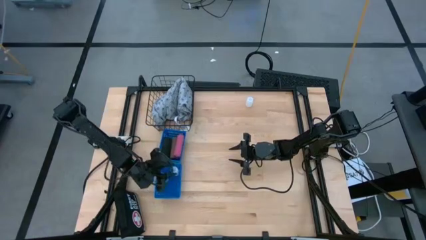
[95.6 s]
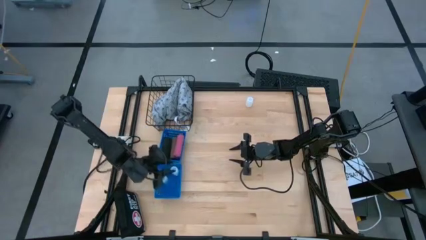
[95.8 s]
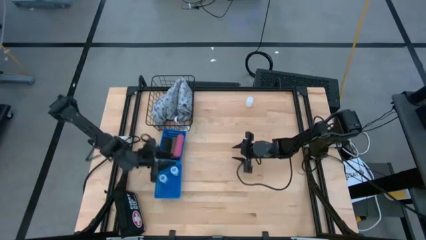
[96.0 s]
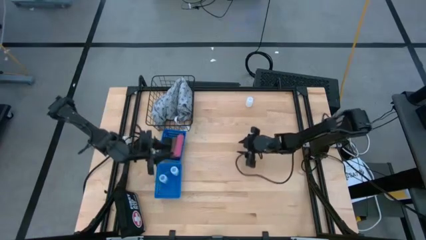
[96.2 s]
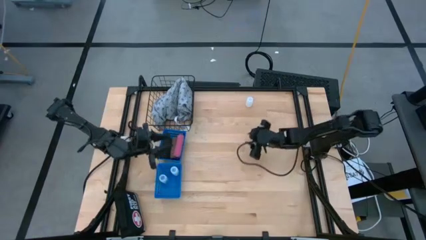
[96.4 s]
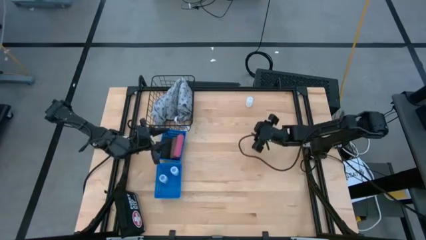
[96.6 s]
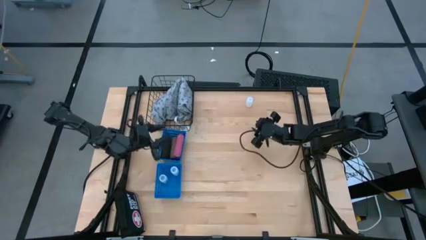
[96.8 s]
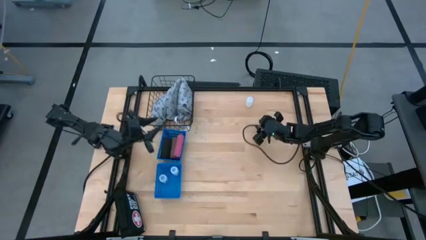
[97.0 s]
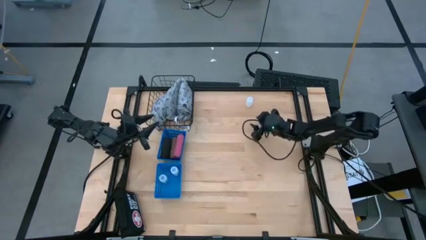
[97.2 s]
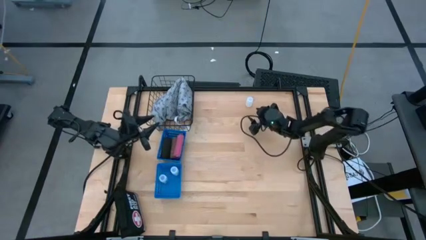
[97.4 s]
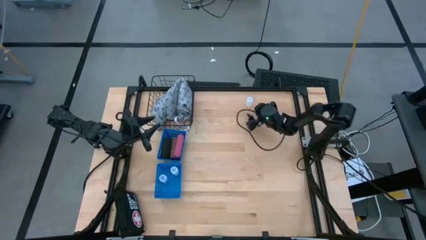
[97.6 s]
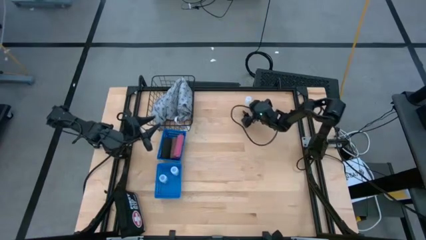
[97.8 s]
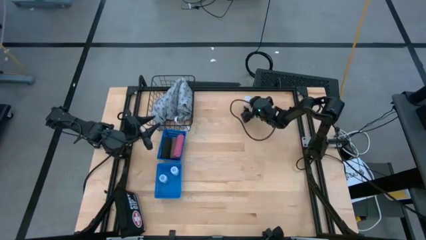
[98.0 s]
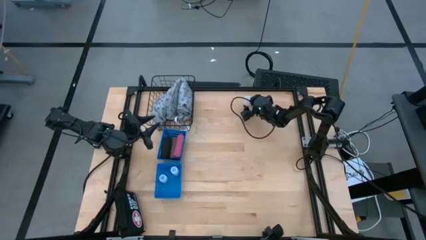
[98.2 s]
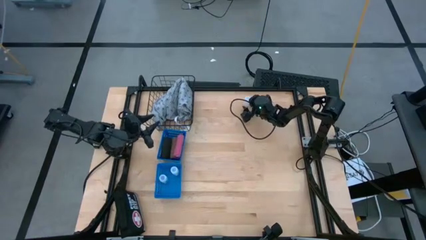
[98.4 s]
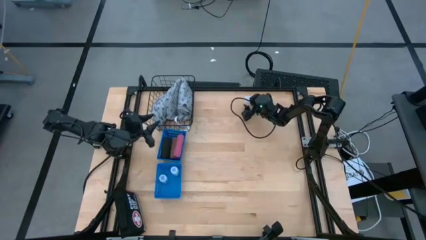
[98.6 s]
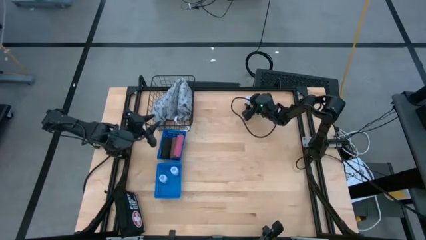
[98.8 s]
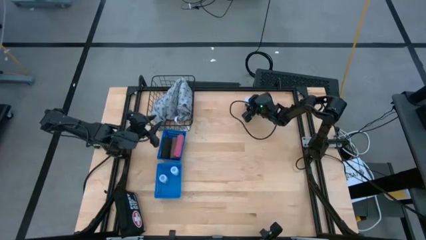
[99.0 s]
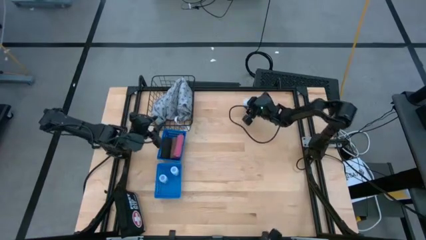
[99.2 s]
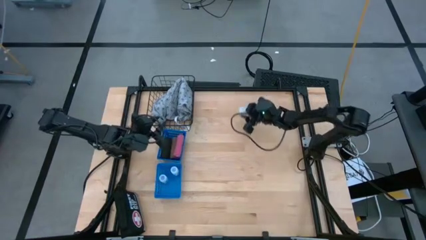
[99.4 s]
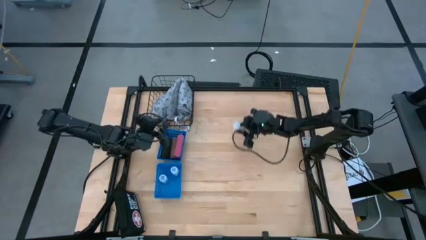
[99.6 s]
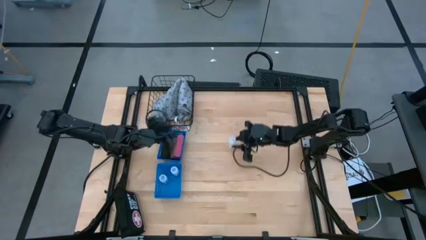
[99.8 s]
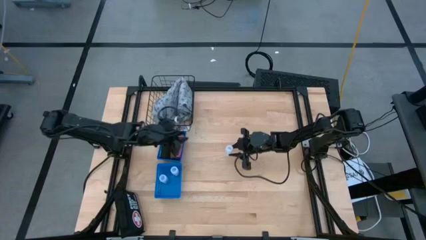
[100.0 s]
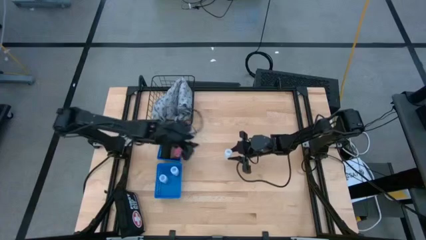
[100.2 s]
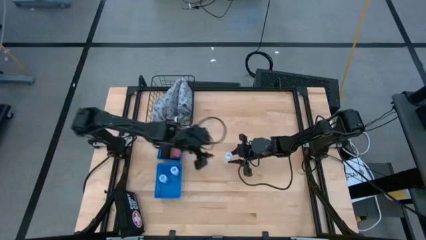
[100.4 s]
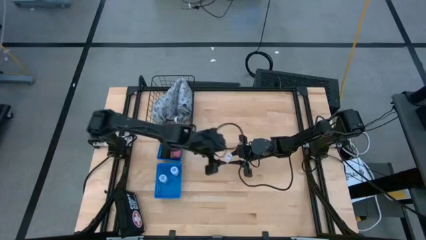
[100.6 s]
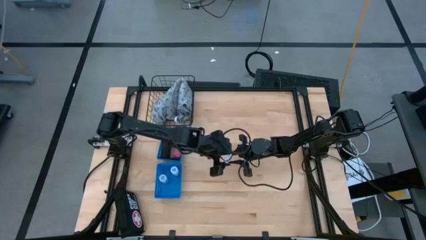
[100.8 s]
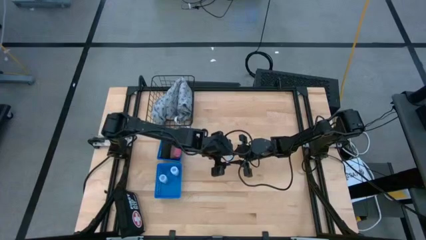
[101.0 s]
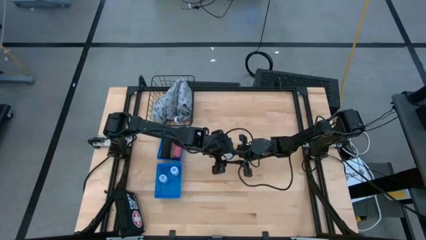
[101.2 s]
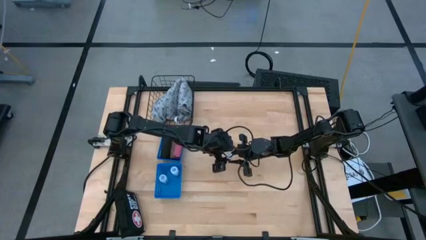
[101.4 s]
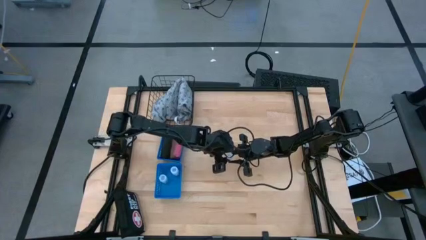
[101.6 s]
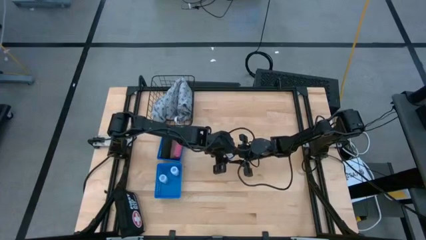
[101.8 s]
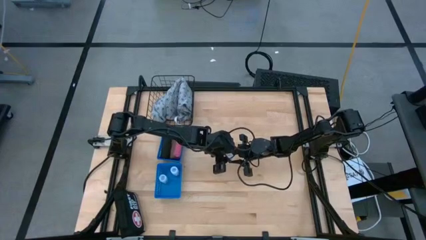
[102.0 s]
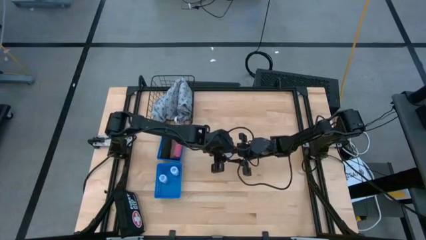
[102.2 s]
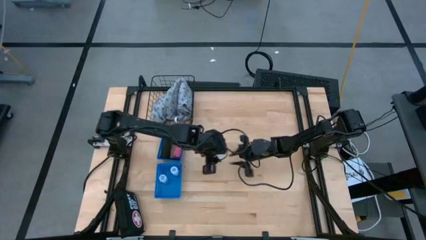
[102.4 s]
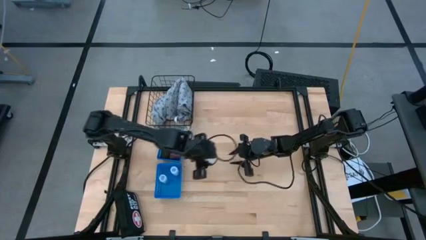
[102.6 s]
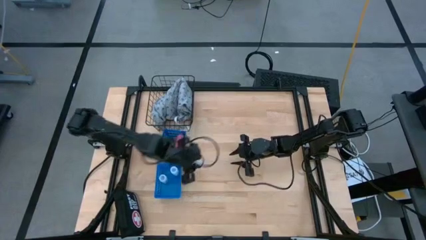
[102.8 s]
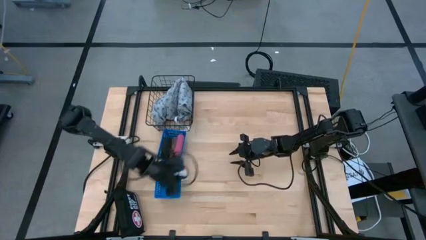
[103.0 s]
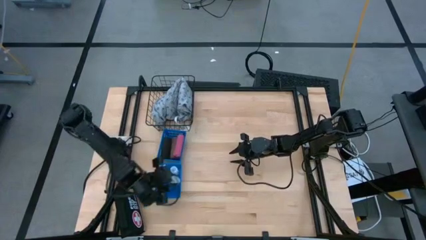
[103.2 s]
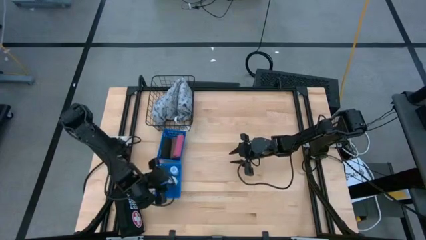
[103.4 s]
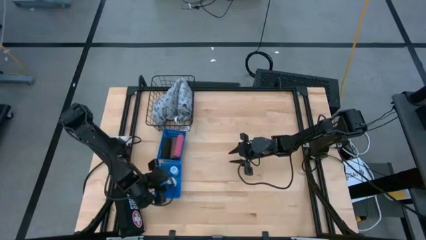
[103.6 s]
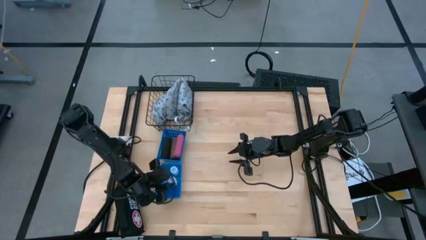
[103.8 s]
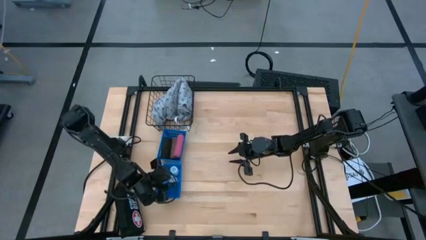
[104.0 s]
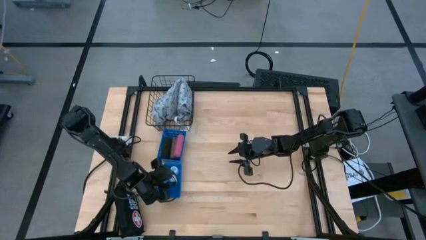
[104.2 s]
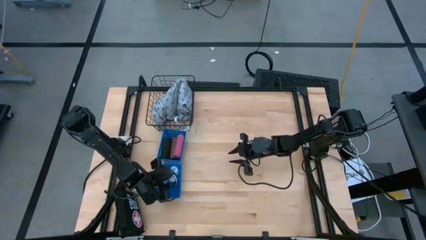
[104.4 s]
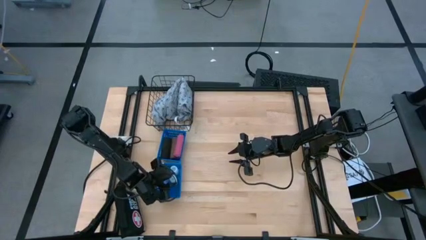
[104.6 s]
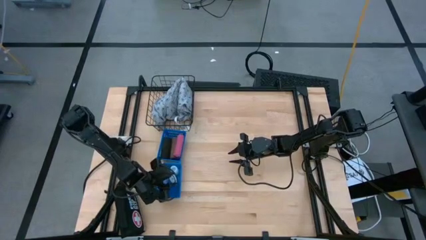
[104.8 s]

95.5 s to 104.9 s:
Task: Pick & Place Medicine items
Put the transparent bottle into the bottom blue basket

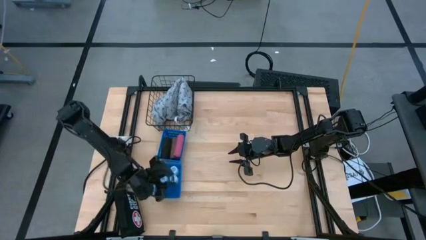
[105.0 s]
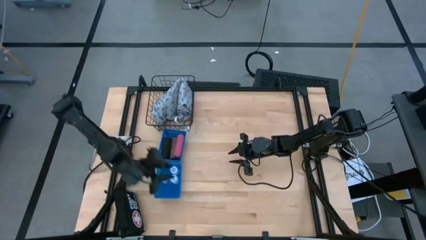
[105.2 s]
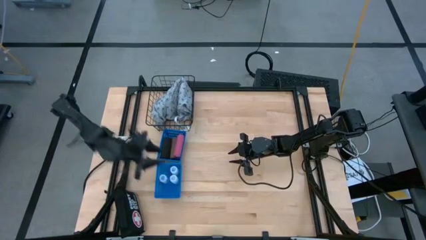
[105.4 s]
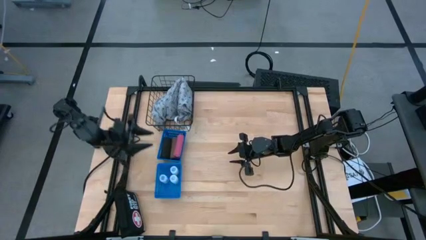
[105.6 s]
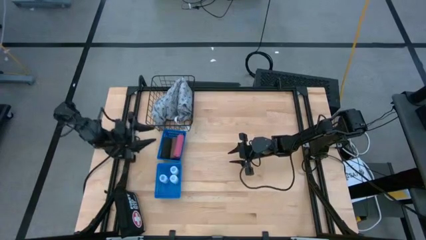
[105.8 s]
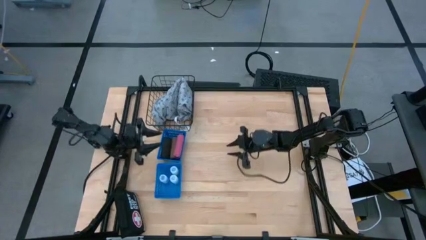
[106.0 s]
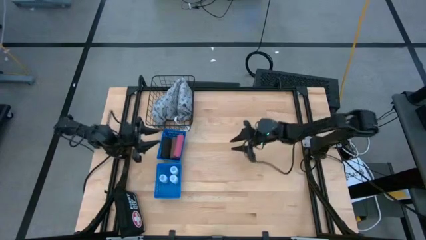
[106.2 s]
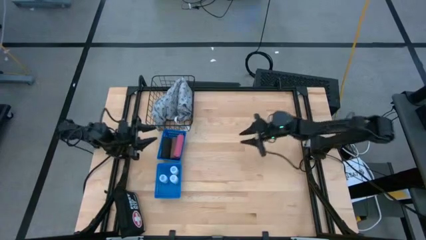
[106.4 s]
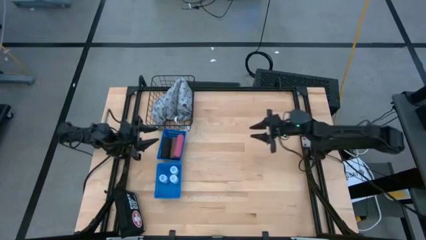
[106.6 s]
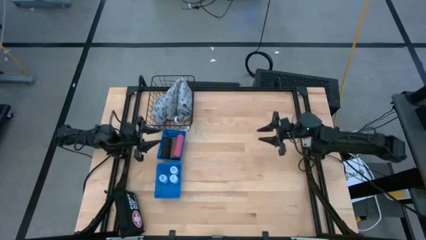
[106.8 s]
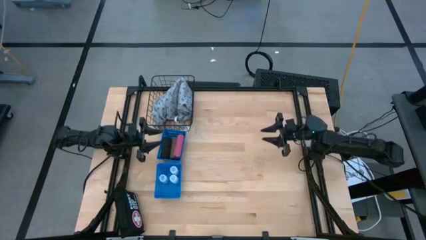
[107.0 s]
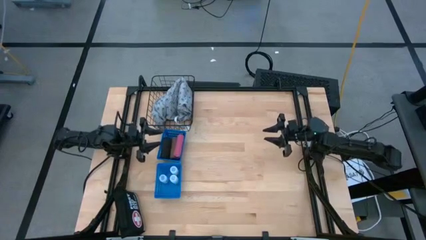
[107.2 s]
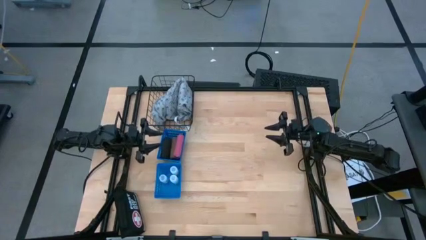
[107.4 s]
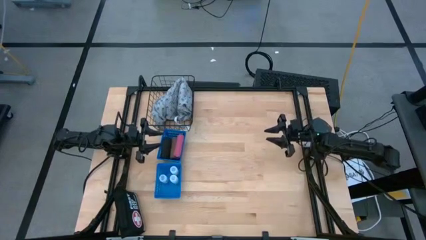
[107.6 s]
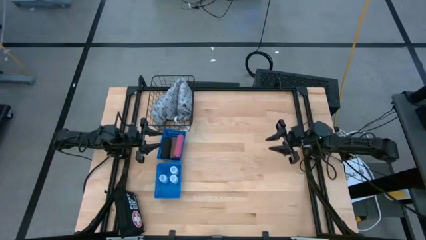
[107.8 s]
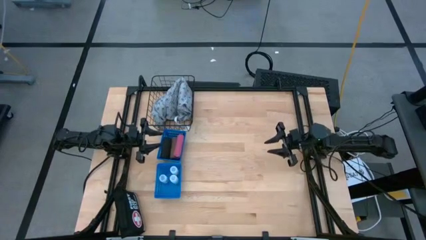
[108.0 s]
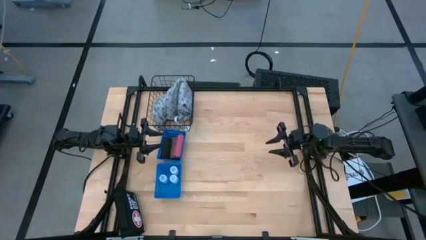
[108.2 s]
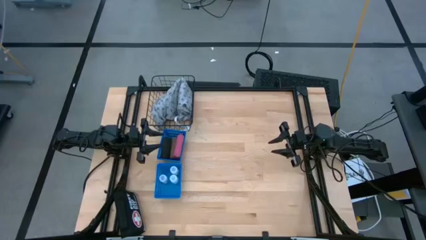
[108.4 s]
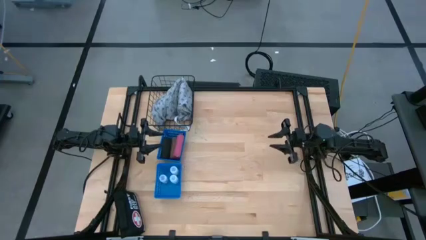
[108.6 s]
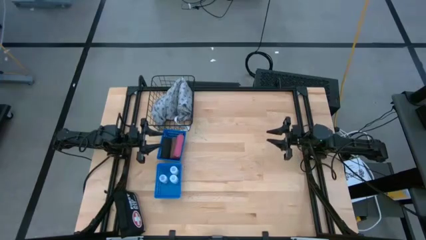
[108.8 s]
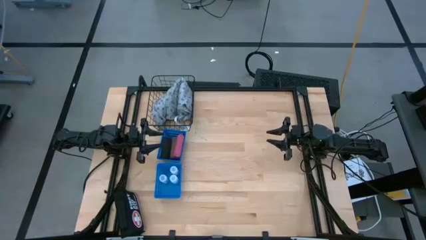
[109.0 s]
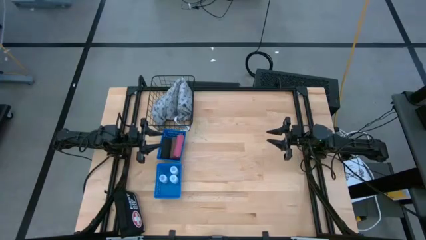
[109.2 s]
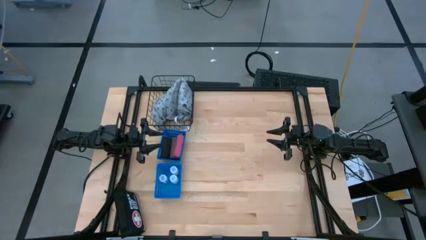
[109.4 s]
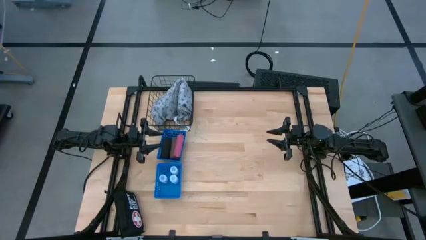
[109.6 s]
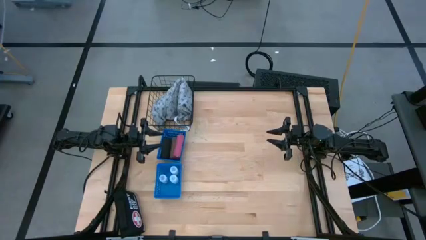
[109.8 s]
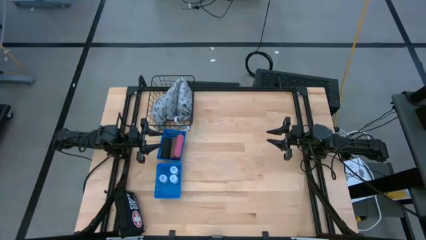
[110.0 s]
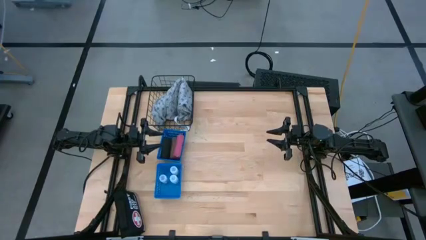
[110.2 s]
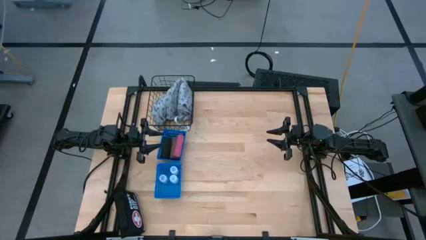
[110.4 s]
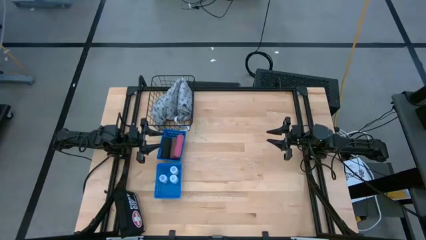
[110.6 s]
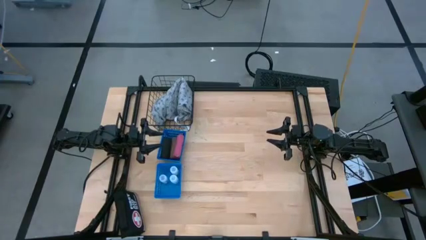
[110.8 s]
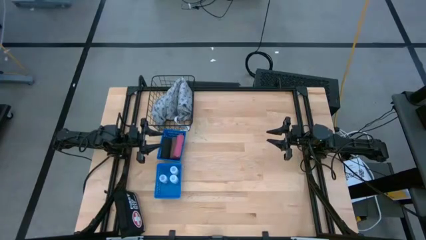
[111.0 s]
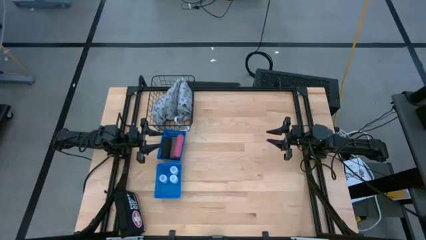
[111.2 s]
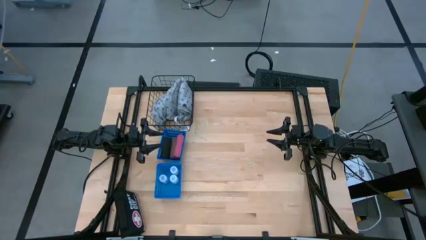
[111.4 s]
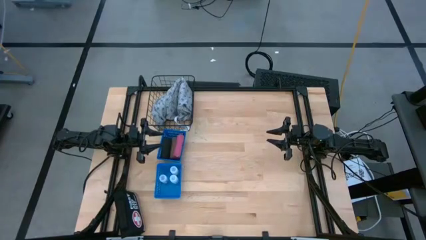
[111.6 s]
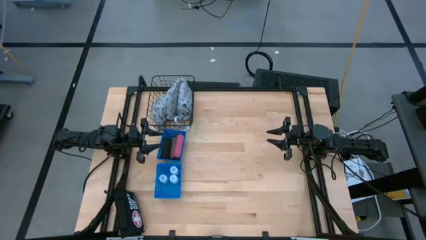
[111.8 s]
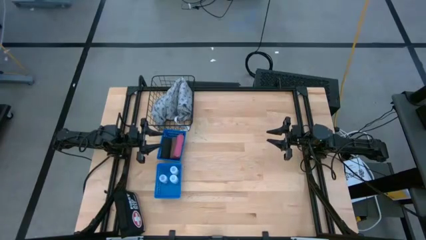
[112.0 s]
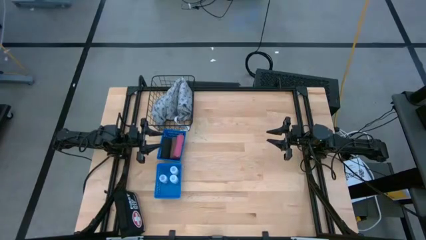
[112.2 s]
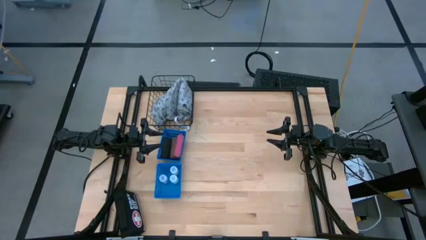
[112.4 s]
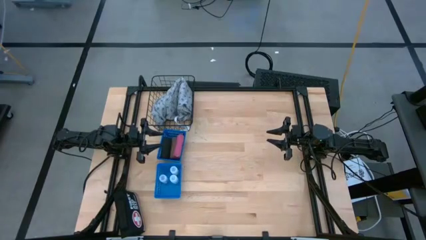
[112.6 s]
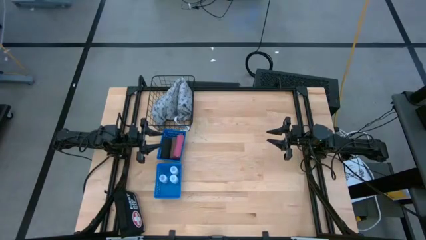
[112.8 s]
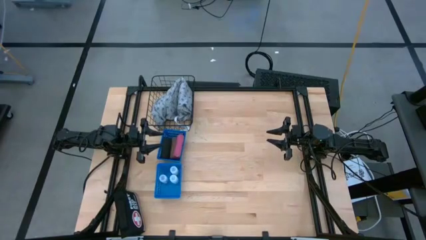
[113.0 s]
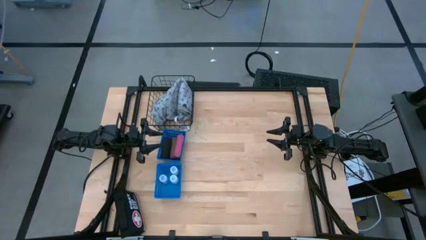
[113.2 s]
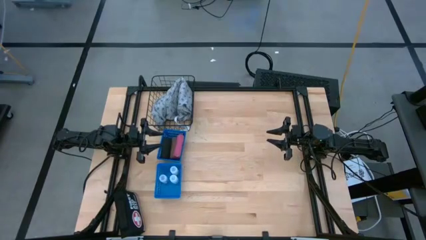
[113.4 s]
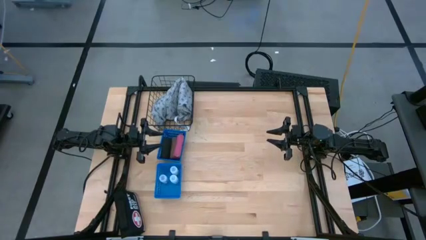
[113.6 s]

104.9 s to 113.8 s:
Return to Home Position
